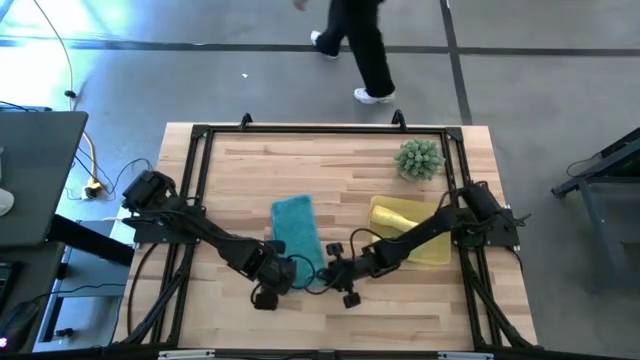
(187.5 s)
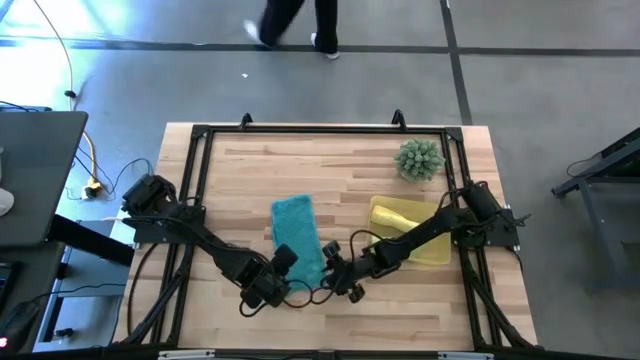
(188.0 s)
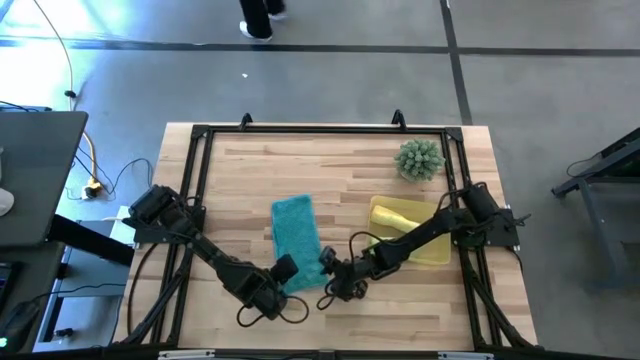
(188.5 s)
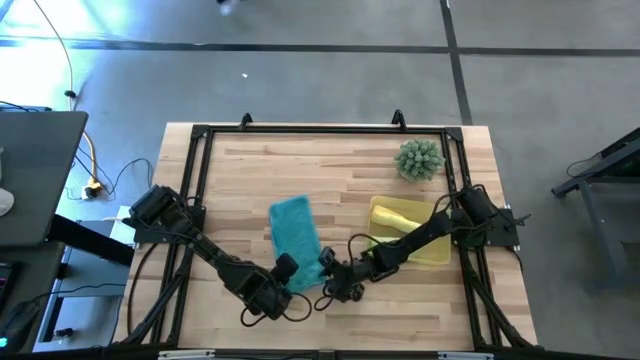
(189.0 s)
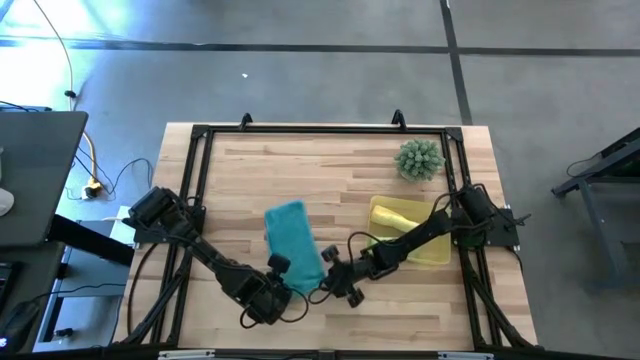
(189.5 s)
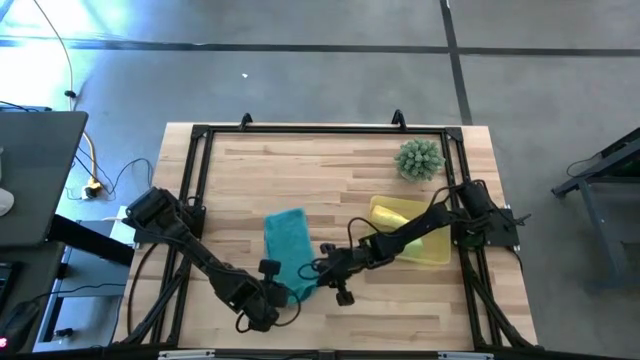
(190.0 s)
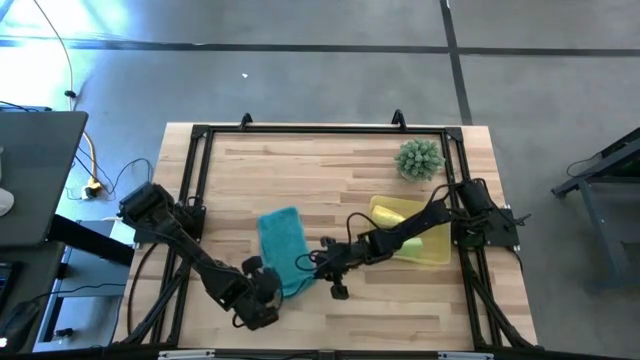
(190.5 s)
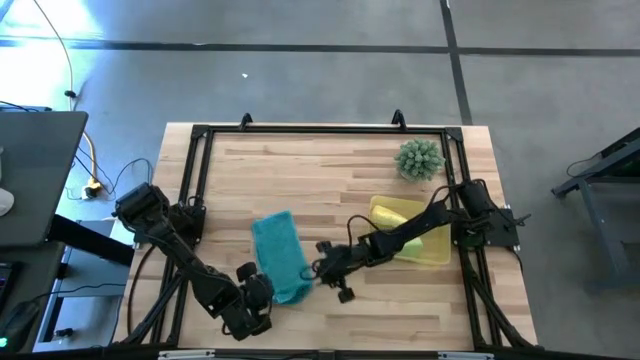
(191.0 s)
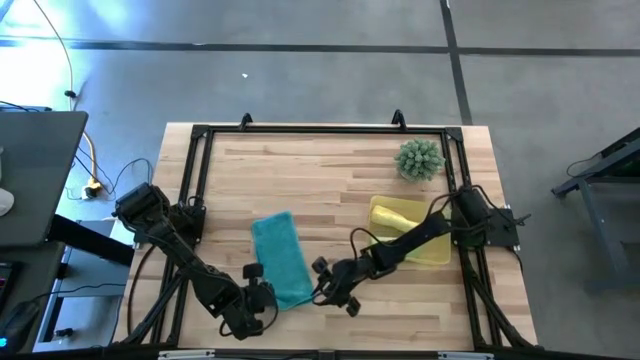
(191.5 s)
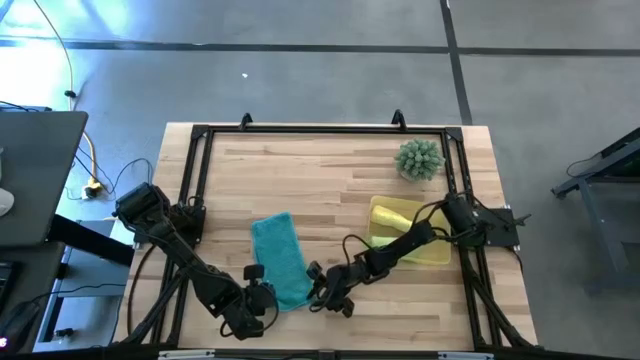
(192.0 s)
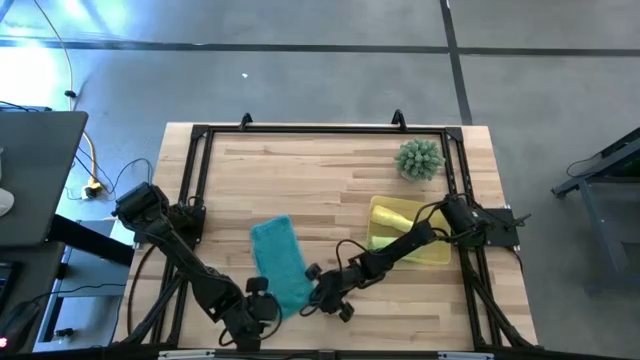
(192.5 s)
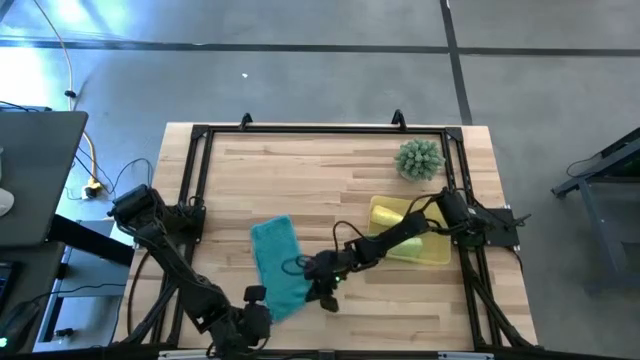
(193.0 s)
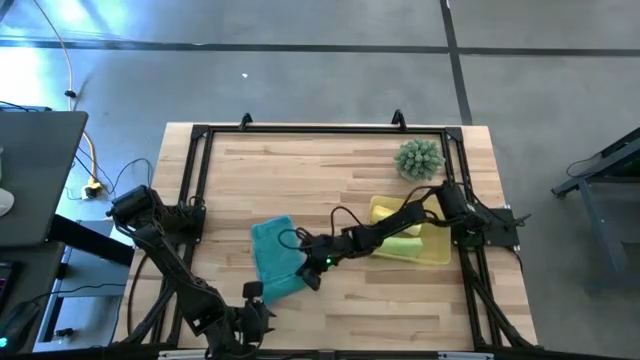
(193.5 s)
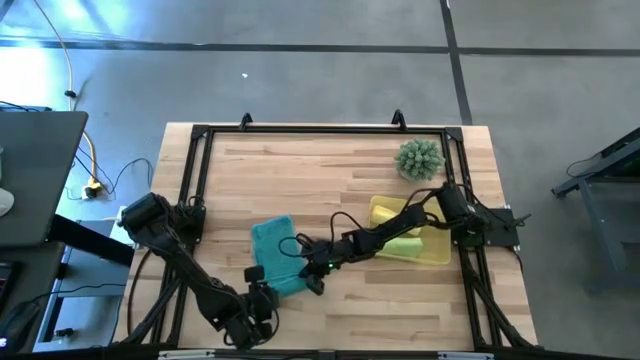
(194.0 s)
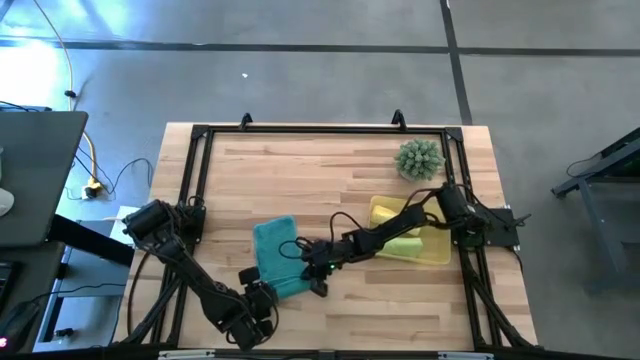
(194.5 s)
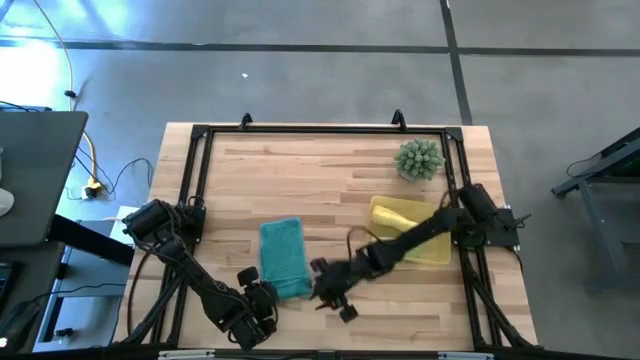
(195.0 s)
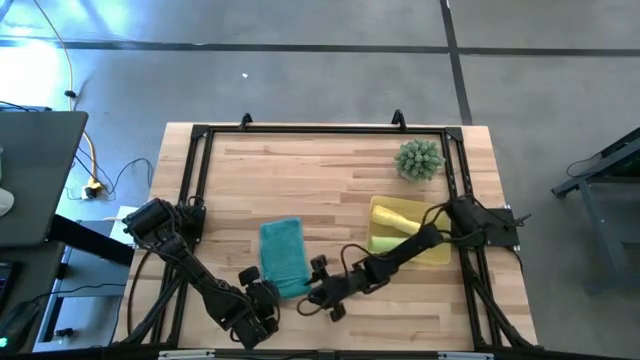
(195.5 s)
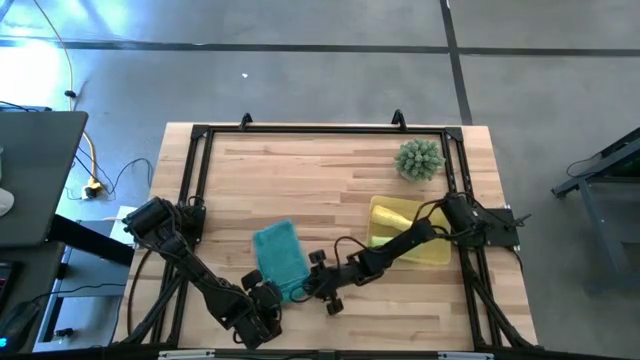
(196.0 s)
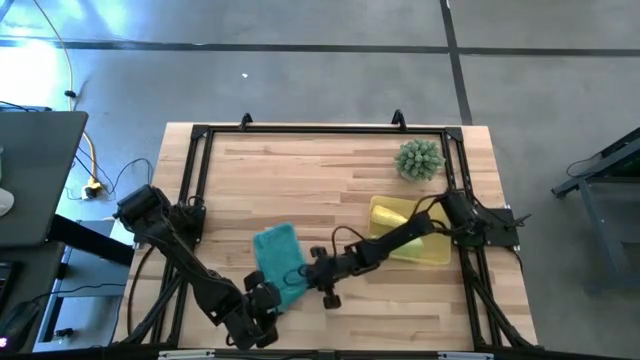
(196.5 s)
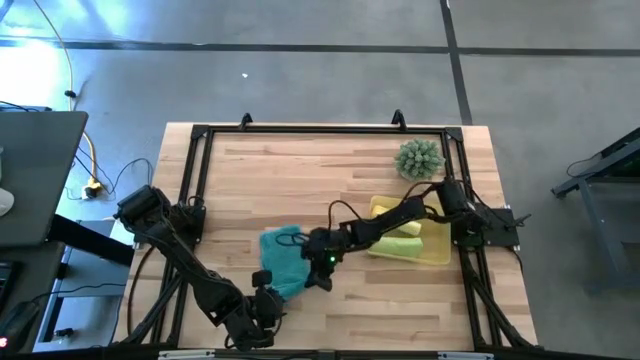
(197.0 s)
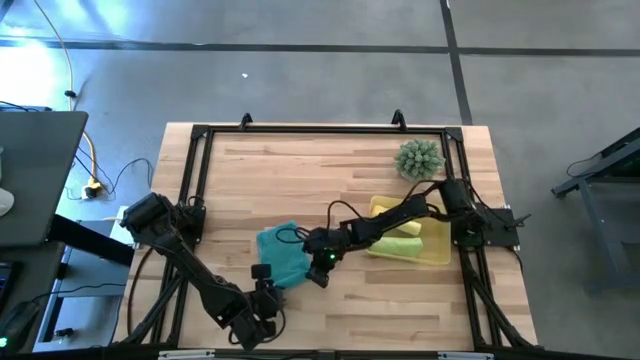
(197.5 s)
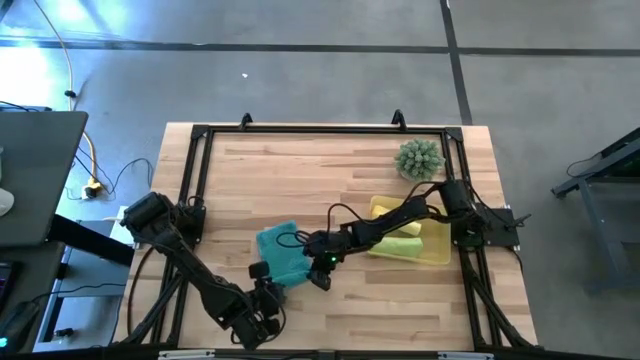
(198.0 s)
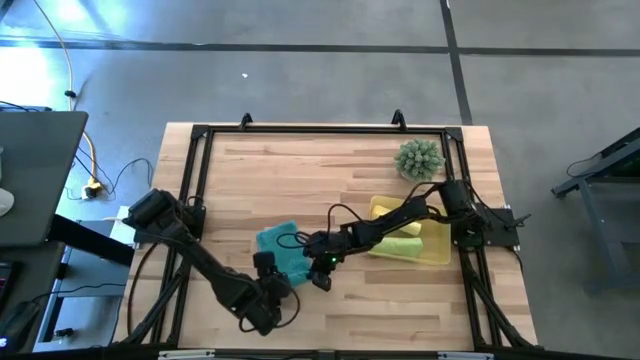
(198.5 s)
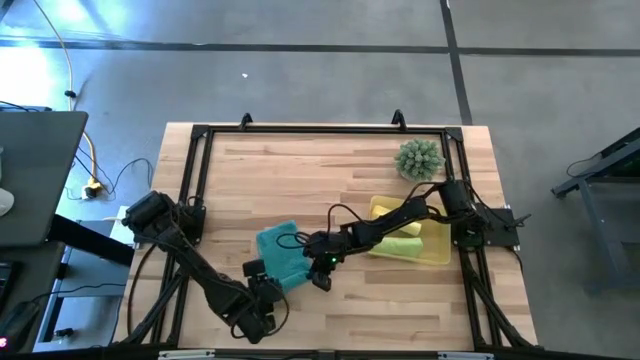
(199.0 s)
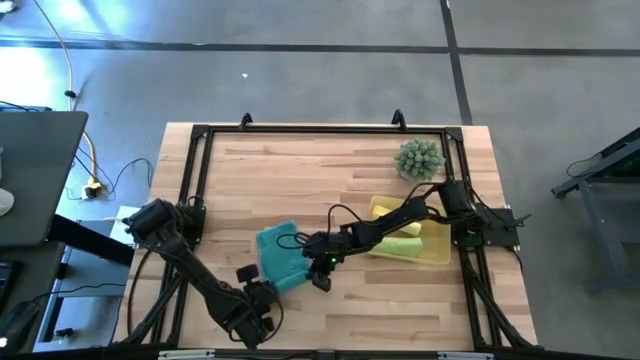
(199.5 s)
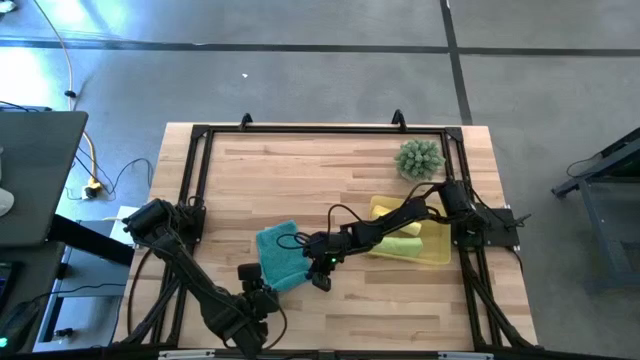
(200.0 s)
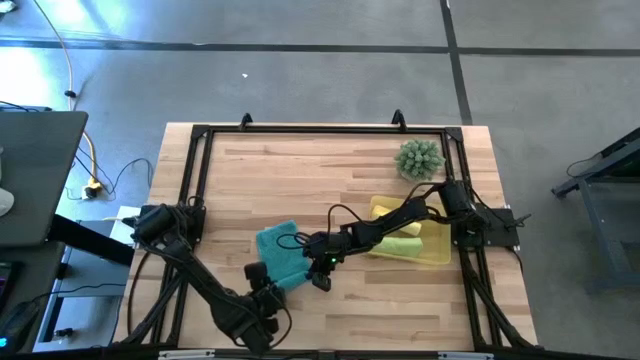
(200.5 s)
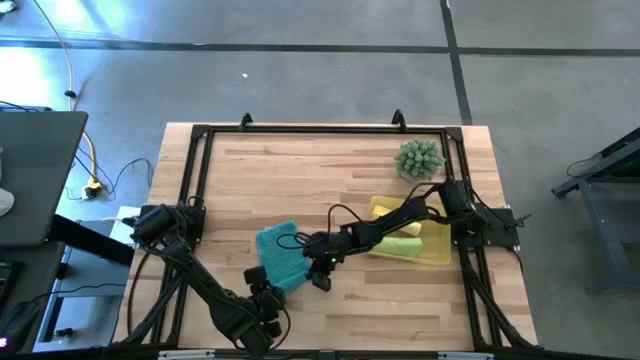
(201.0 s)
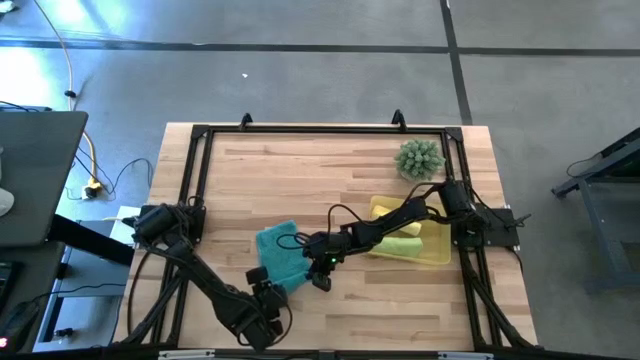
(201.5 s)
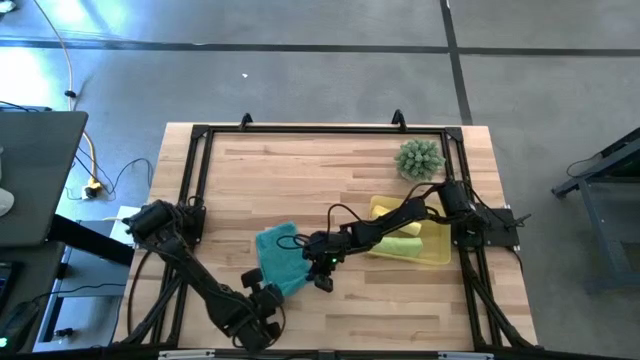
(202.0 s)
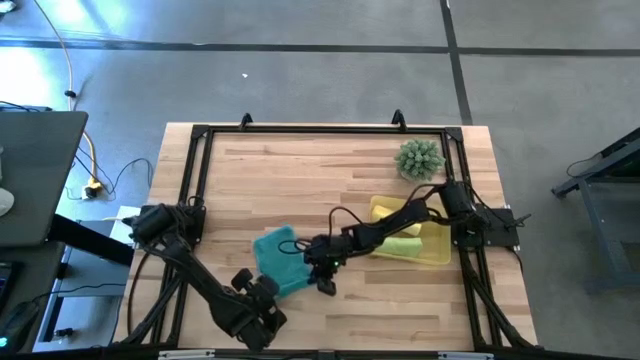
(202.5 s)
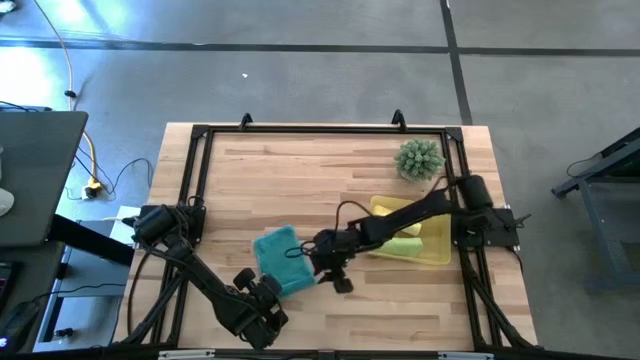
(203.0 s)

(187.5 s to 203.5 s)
Task: Roll microfiber towels into tight, uniform cylinder then place into a basket
Roll the blue microfiber towel

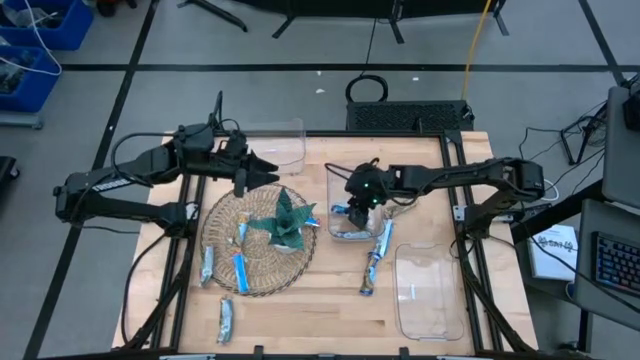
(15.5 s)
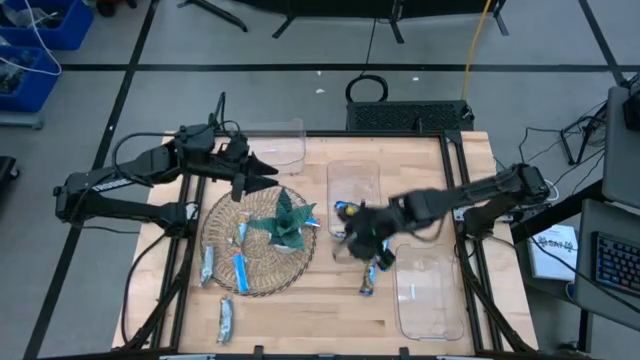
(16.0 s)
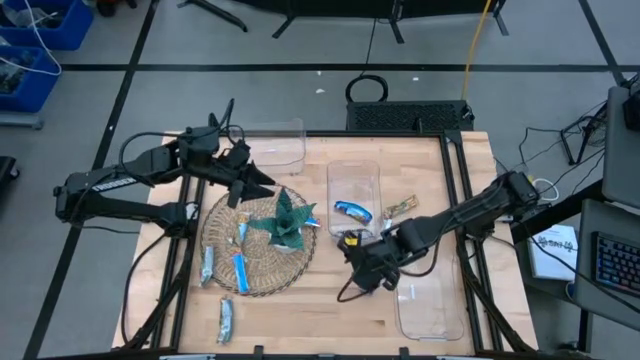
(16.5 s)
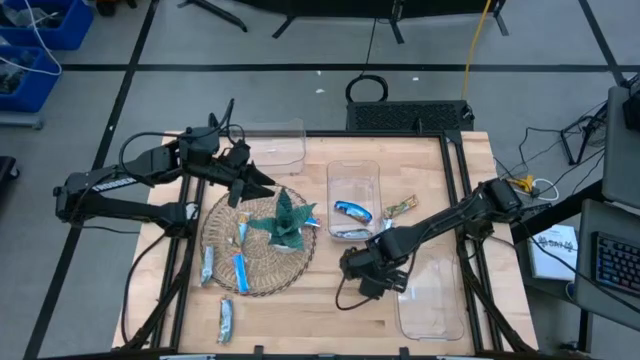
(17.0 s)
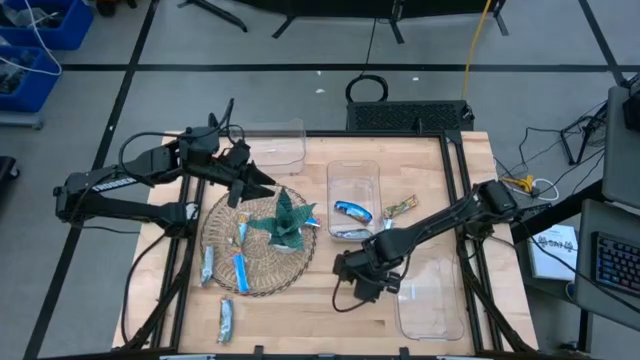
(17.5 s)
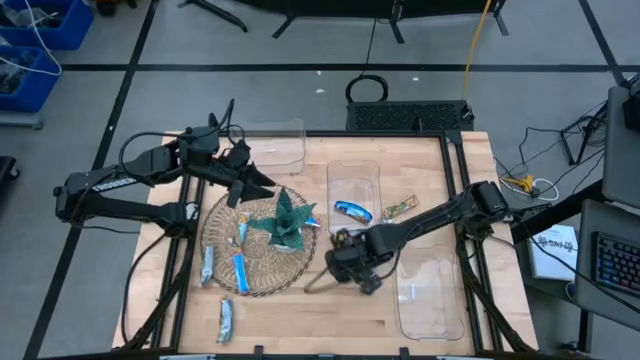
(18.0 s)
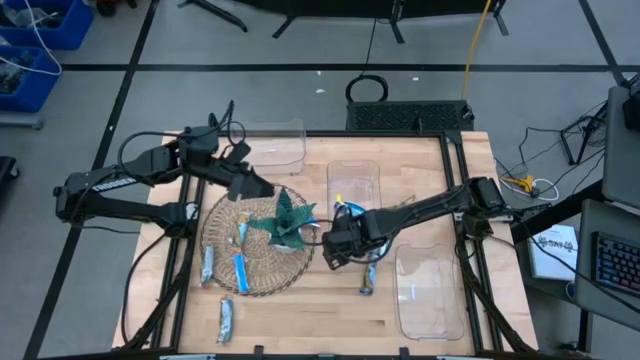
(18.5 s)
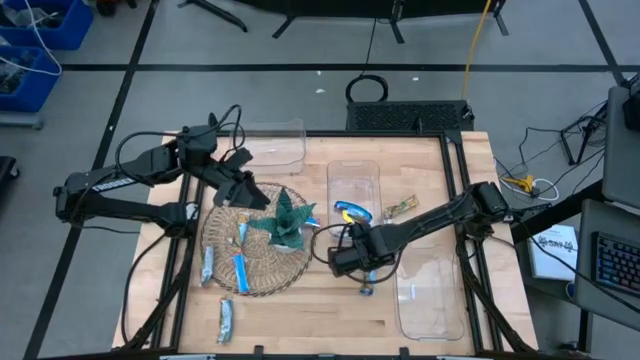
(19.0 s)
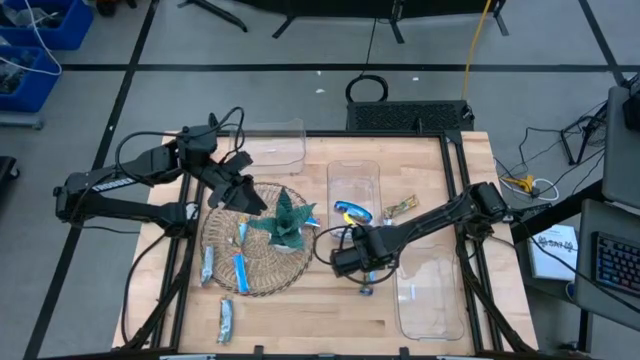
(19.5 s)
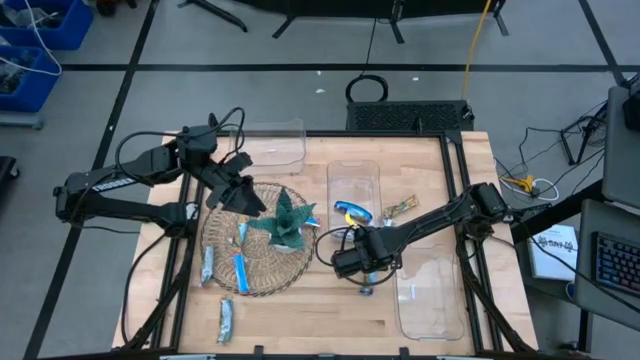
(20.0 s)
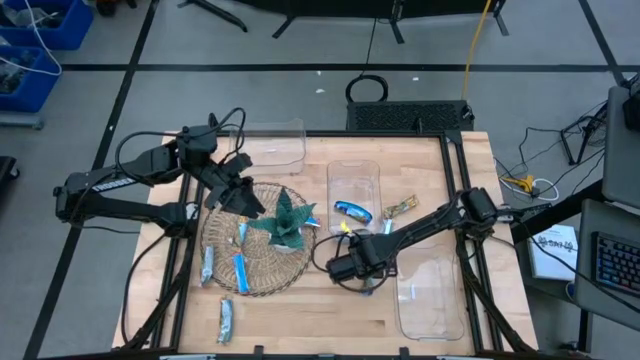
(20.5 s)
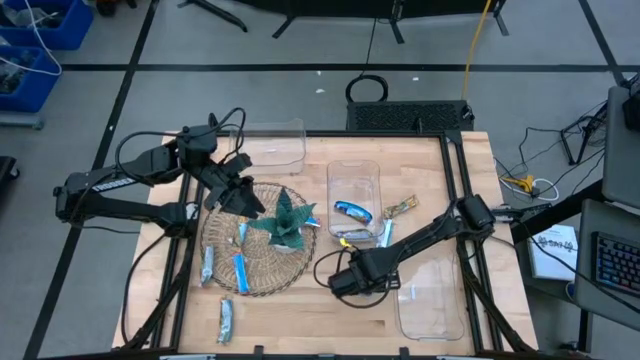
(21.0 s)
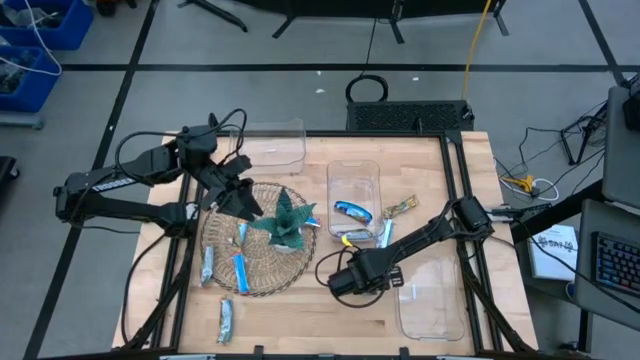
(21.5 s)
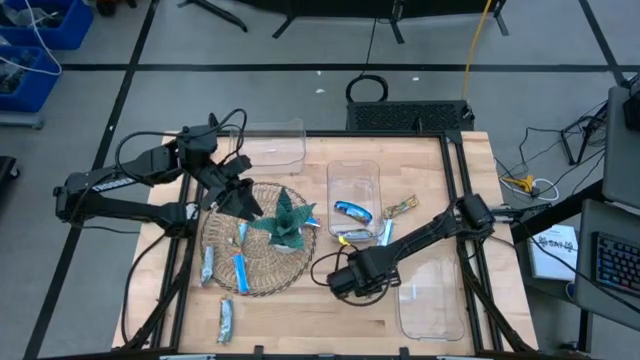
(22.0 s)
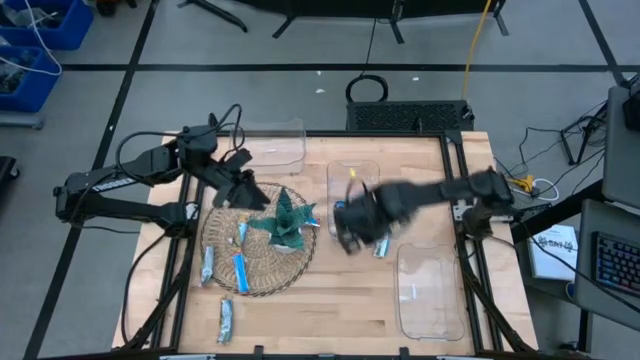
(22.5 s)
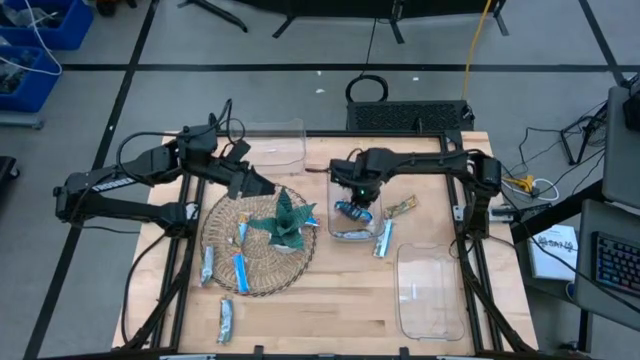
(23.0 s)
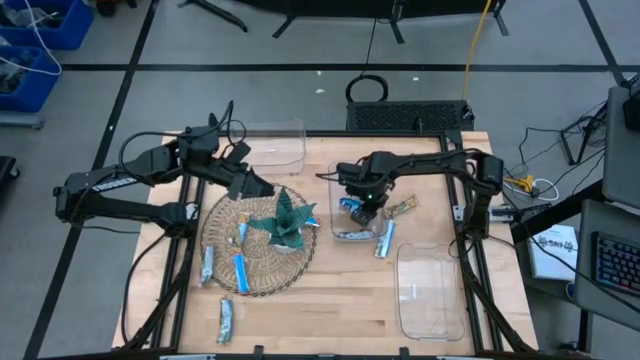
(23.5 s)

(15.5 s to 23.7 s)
Task: Pick and place Granola Bars by type
Put the blue granola bar into the middle transparent bin
